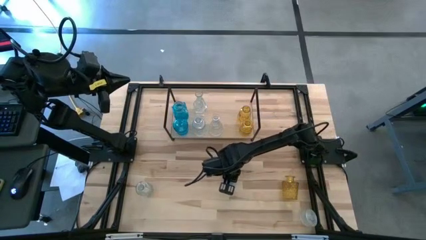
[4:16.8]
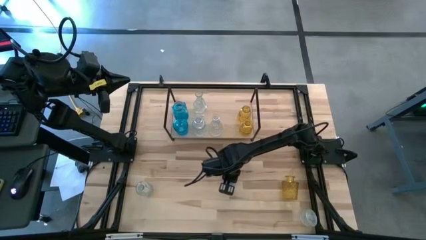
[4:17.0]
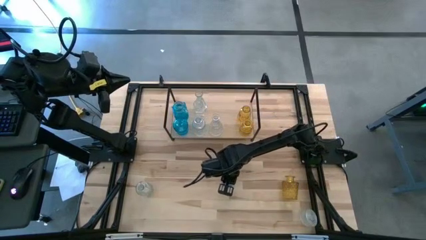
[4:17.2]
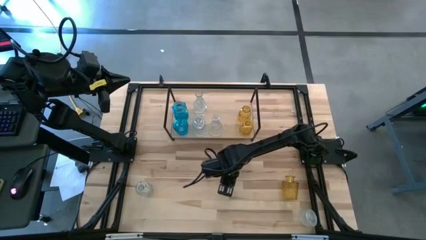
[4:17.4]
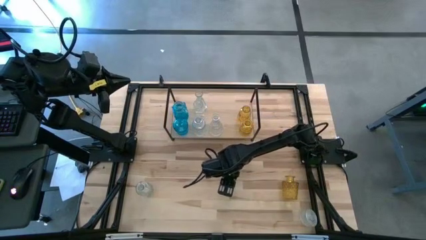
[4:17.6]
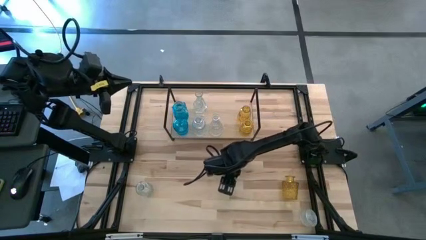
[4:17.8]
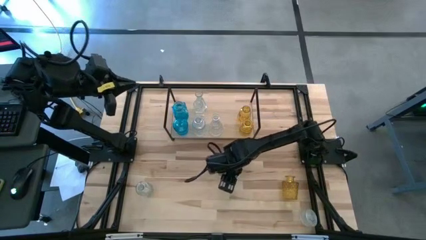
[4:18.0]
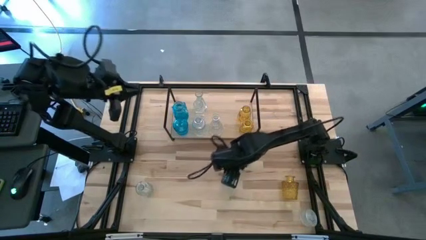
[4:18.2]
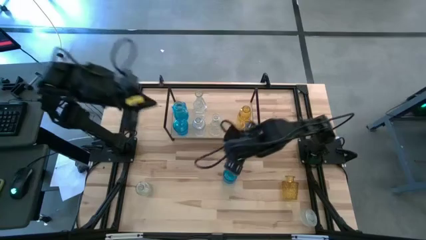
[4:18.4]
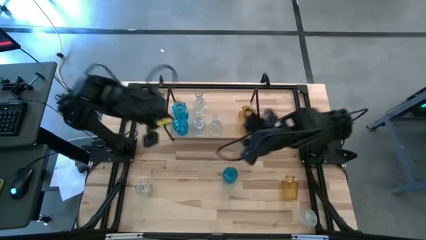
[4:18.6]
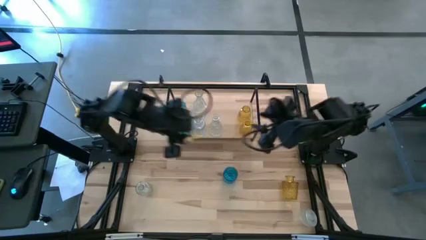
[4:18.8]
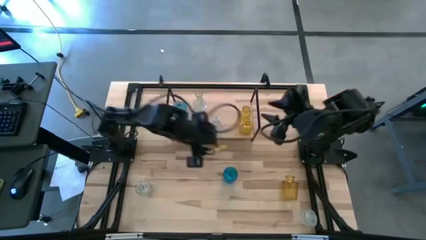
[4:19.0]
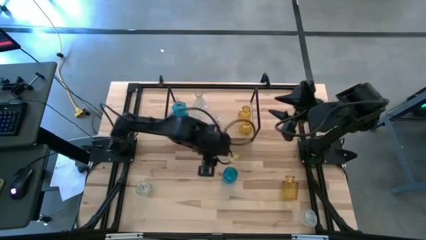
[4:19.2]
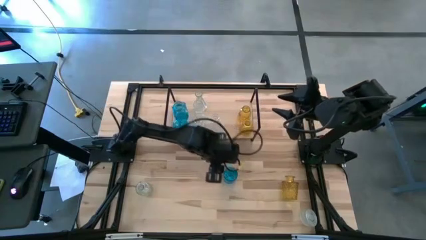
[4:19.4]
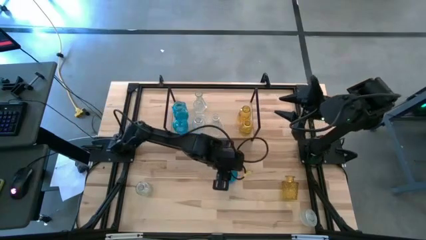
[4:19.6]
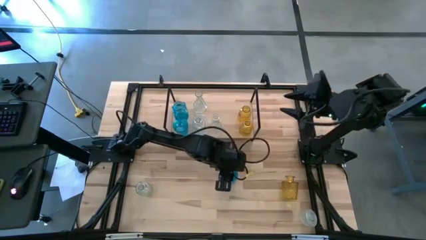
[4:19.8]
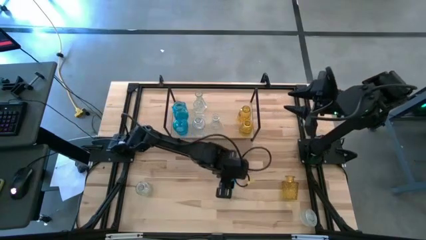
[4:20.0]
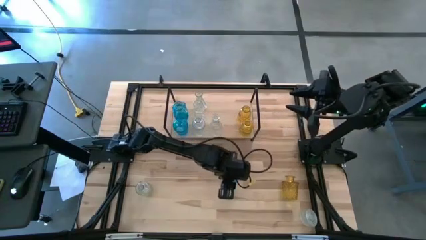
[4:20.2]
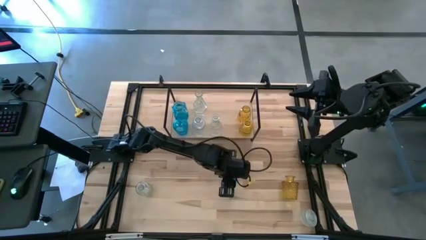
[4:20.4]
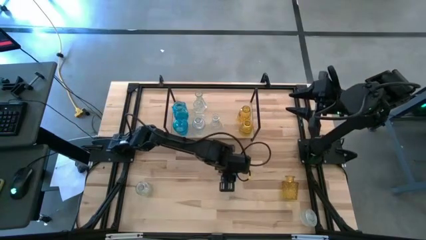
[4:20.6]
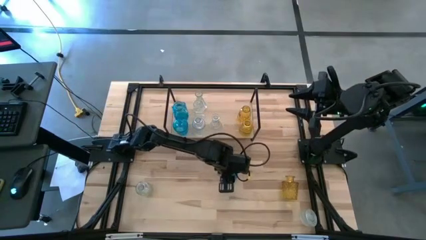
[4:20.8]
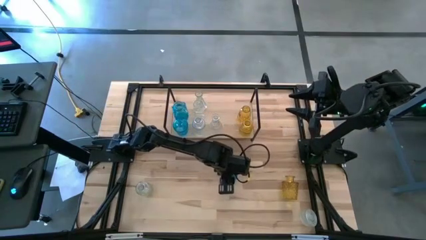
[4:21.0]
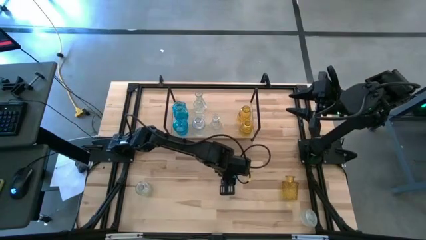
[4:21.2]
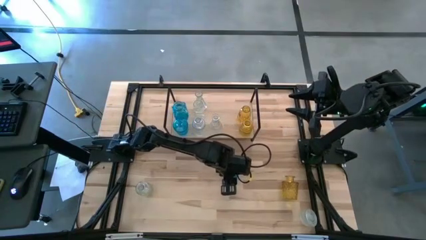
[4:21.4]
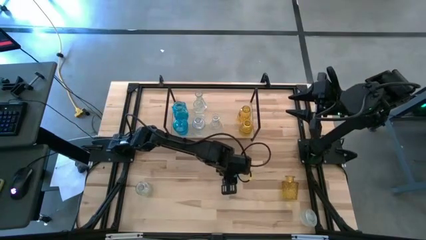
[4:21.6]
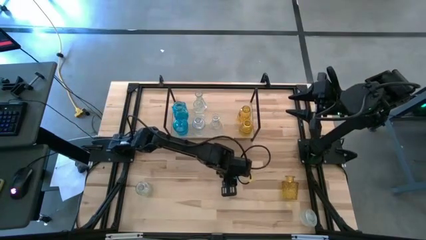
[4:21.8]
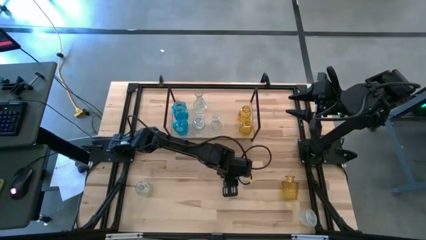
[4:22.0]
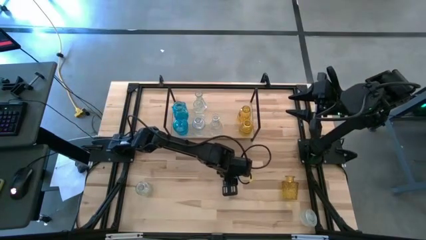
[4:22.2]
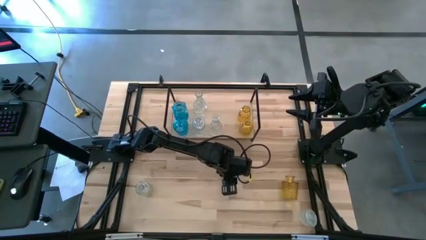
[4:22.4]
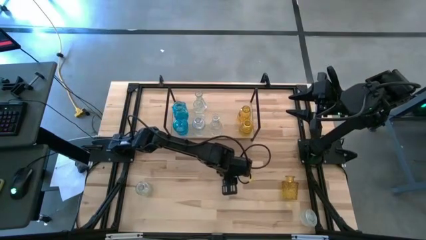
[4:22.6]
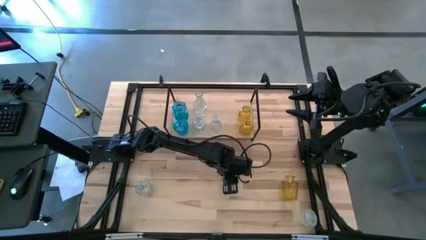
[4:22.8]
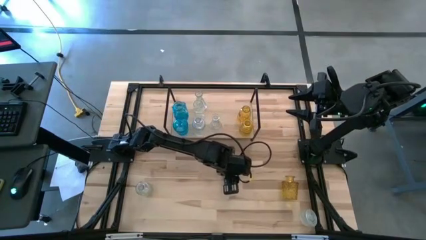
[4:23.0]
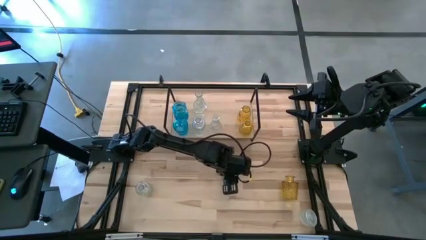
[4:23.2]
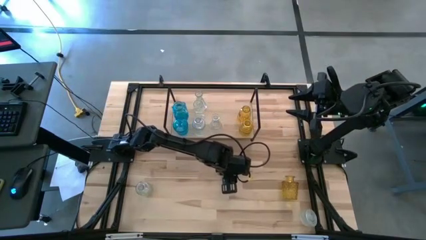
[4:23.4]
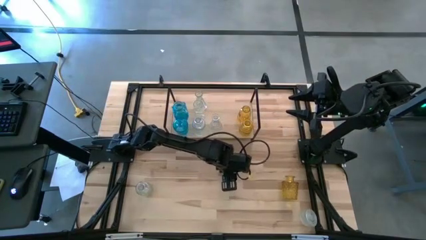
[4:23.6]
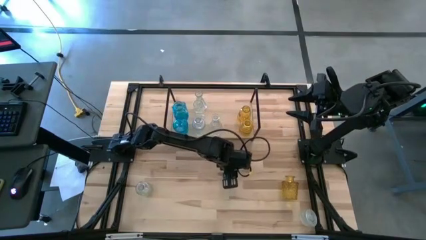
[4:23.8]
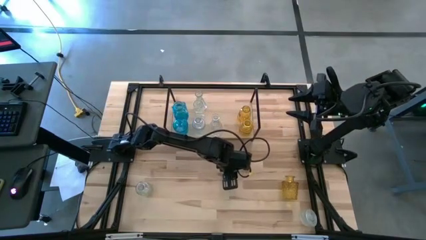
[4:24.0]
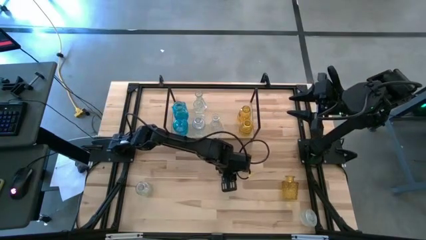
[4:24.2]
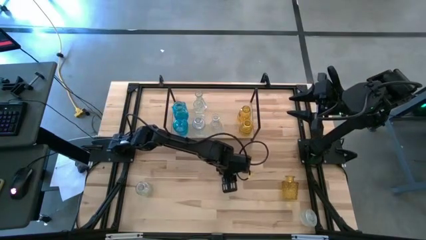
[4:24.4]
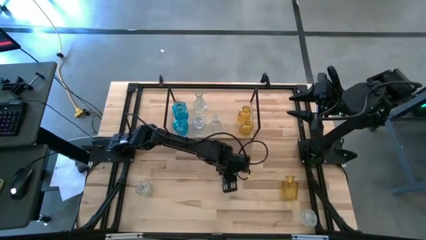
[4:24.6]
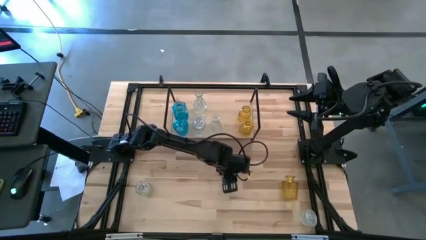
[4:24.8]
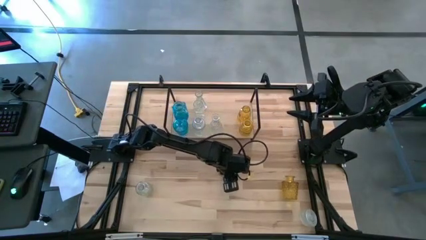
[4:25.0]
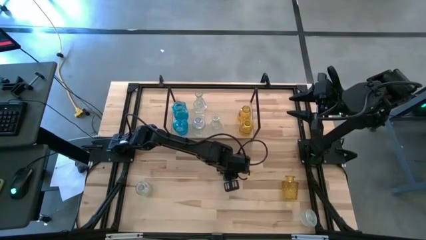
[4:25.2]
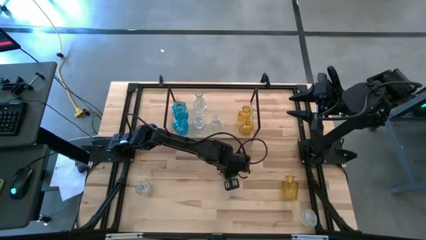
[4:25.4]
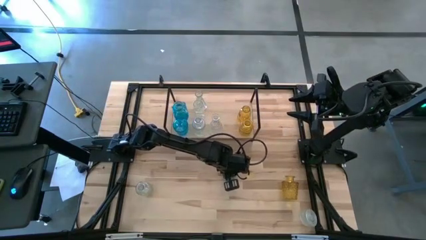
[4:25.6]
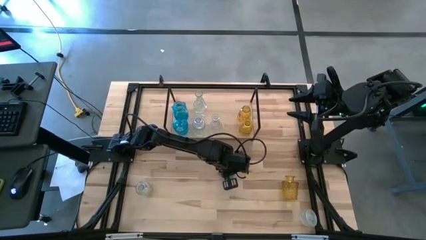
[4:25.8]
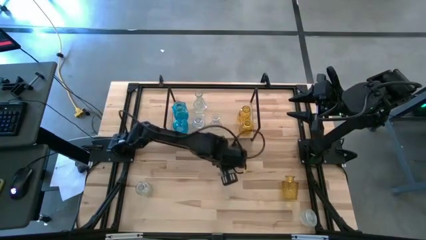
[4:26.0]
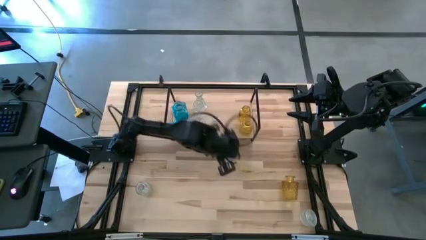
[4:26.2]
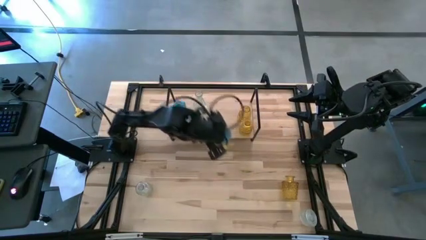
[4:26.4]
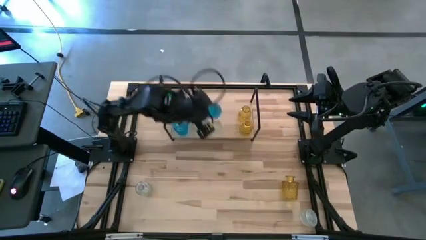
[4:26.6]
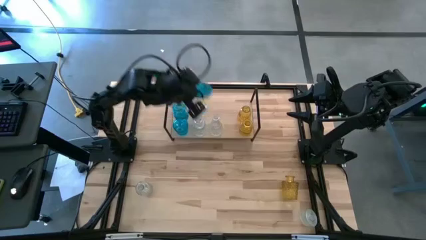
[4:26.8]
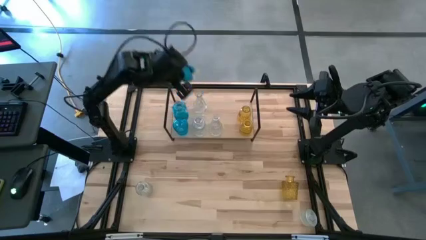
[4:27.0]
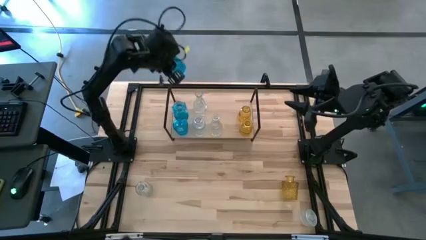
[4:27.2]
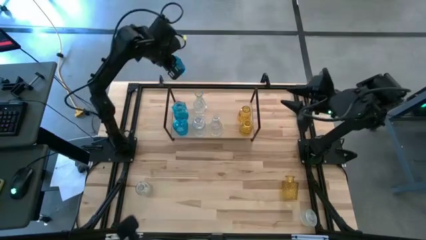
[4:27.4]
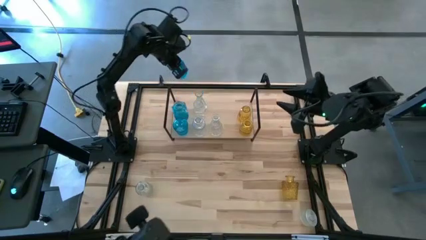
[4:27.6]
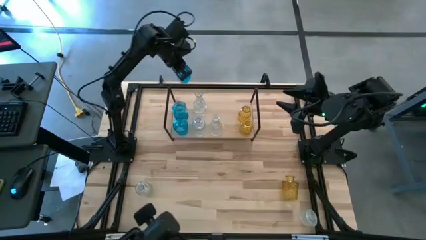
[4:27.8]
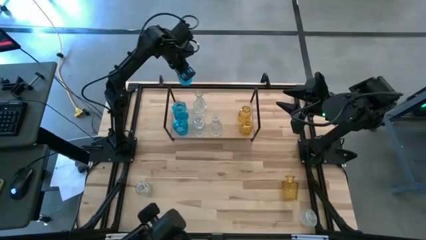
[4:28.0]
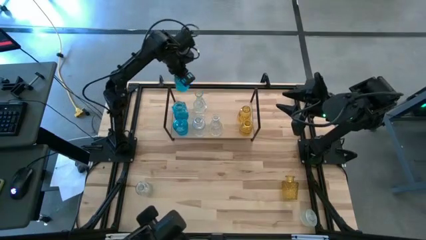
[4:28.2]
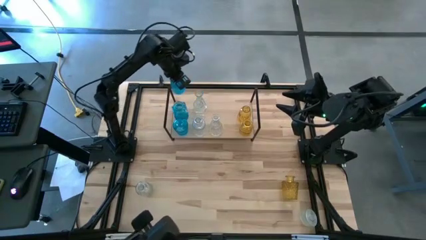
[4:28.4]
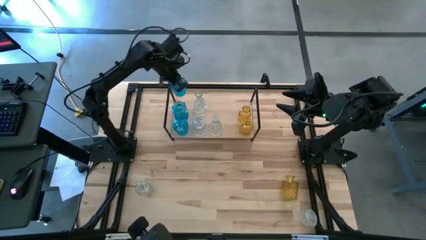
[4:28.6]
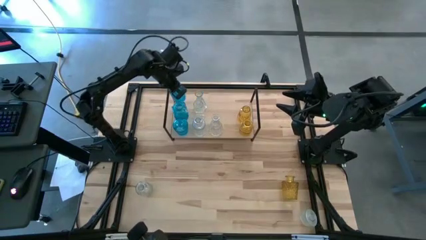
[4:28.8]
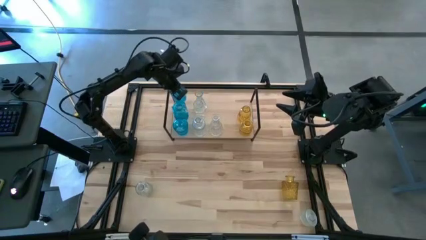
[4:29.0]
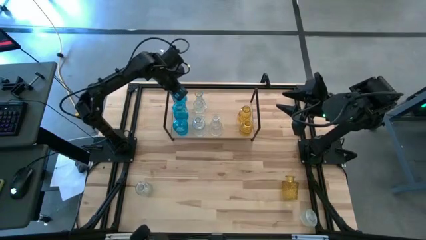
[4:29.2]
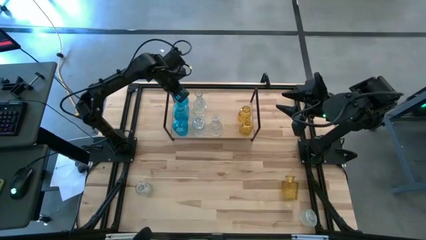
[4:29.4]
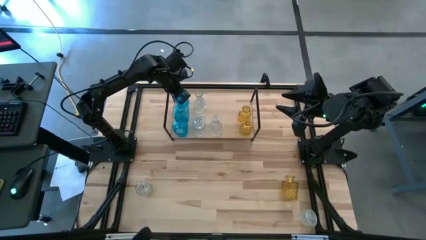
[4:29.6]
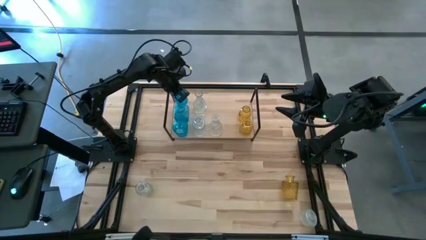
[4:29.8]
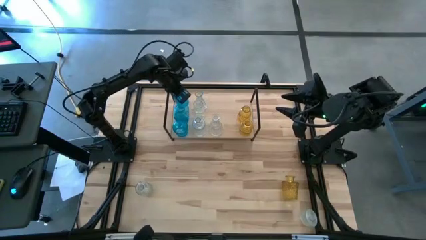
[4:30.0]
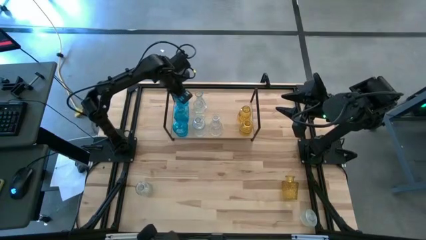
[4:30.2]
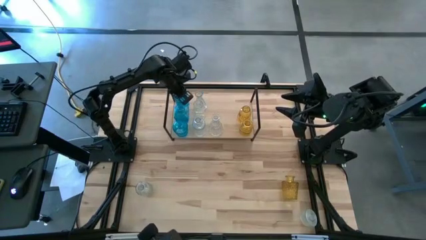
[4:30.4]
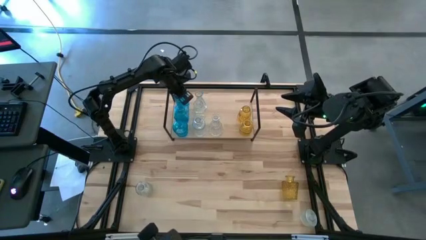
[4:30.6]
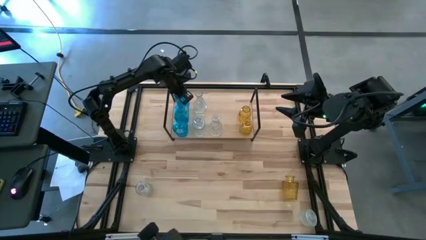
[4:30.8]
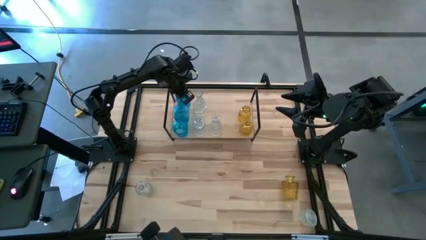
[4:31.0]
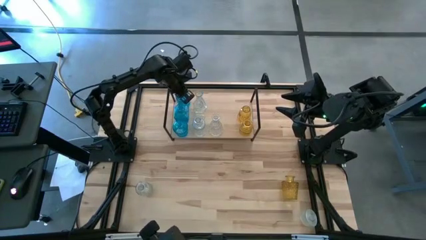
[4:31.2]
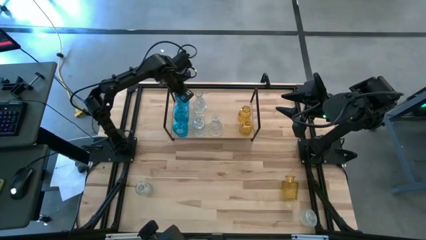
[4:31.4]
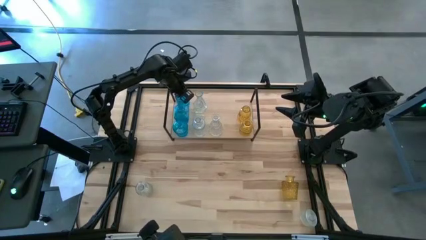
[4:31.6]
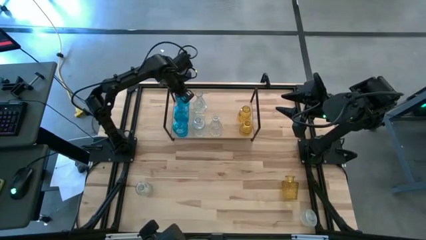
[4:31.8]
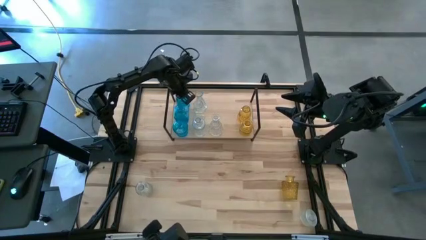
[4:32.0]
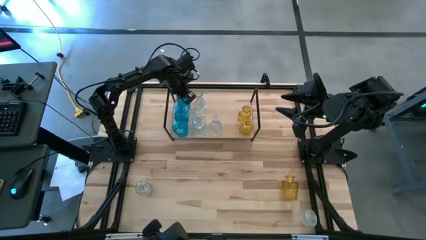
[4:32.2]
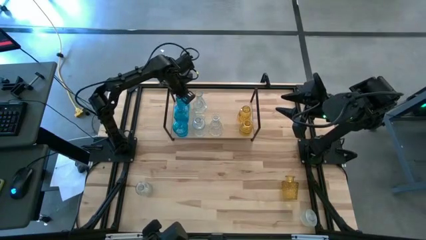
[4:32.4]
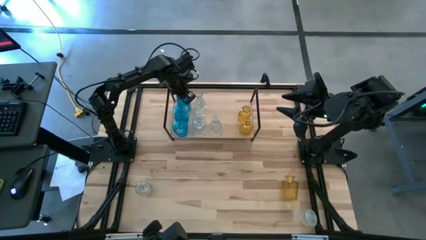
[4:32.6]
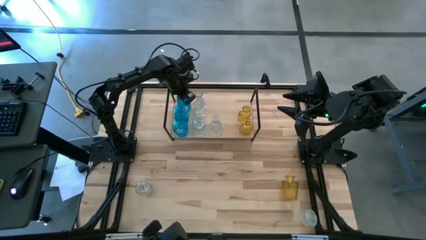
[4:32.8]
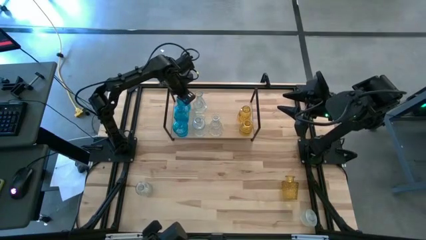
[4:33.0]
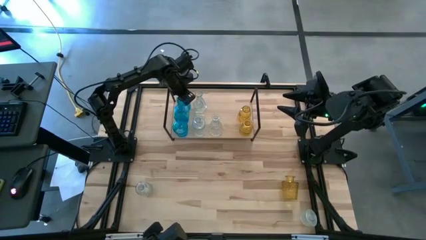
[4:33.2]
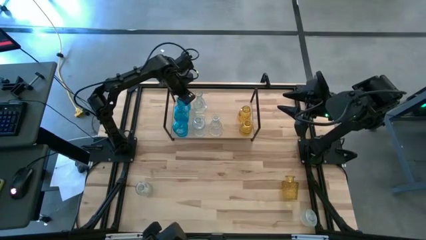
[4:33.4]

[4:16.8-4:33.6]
Task: sort vases onto shelf
Put the blue vase on the shelf aligned with the other blue vases
